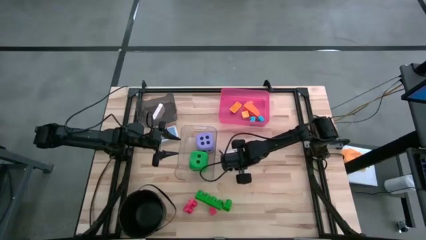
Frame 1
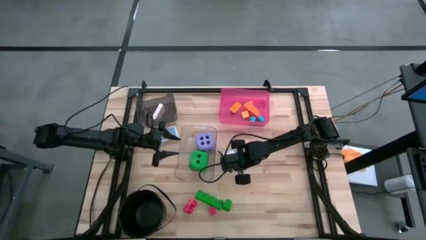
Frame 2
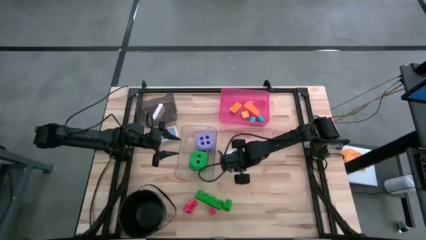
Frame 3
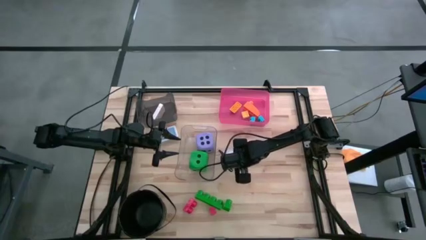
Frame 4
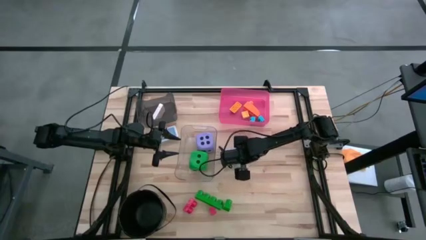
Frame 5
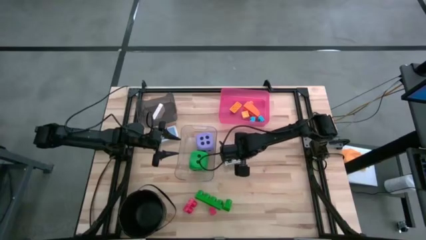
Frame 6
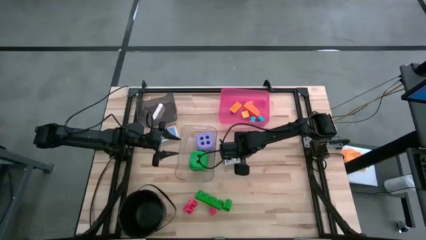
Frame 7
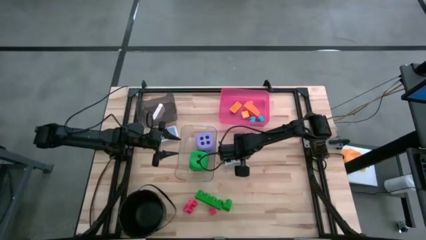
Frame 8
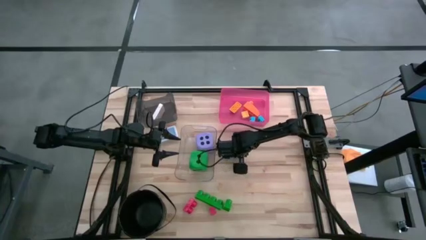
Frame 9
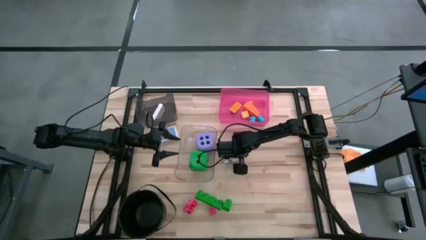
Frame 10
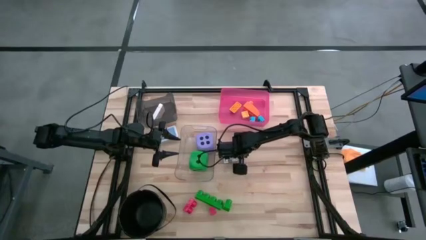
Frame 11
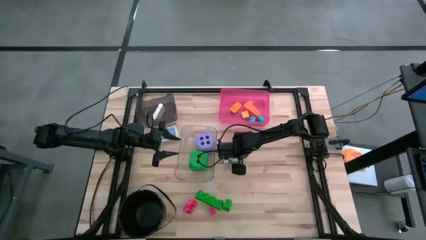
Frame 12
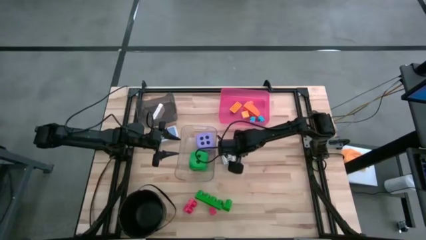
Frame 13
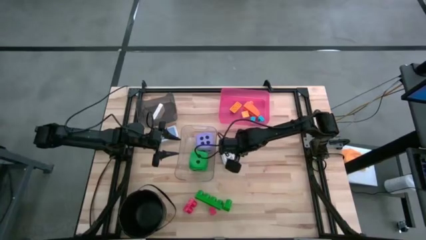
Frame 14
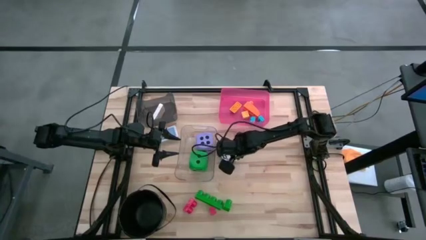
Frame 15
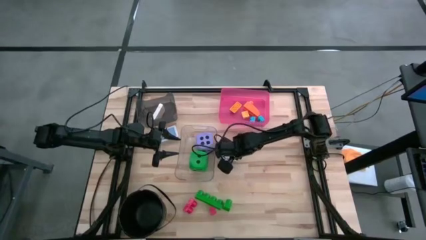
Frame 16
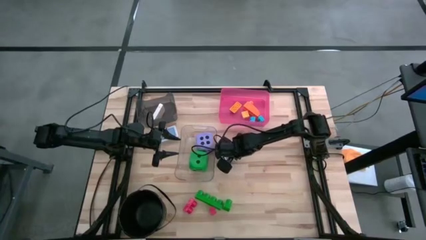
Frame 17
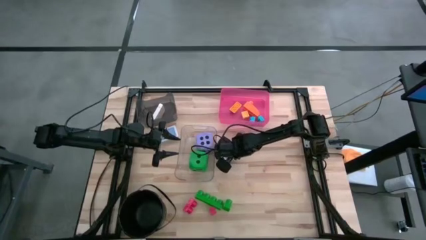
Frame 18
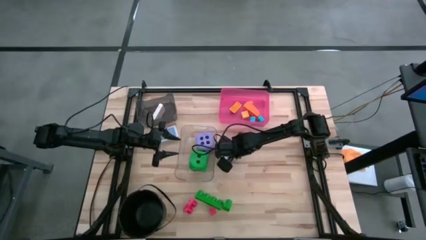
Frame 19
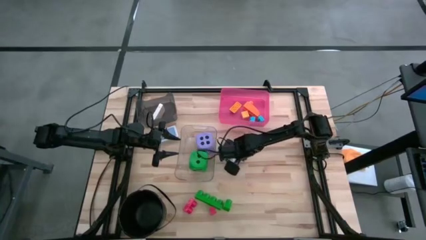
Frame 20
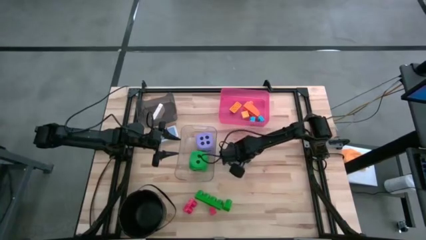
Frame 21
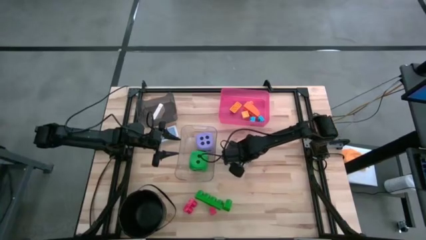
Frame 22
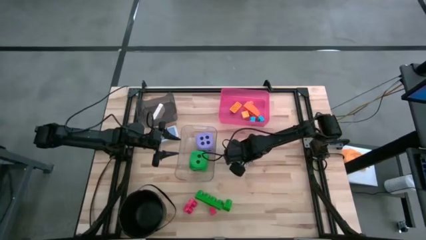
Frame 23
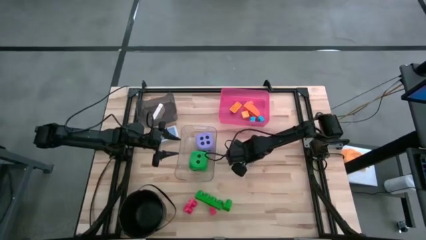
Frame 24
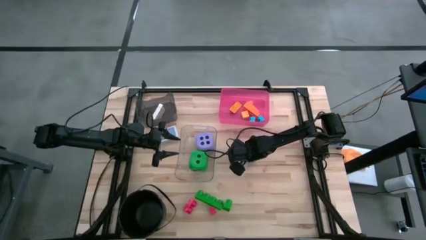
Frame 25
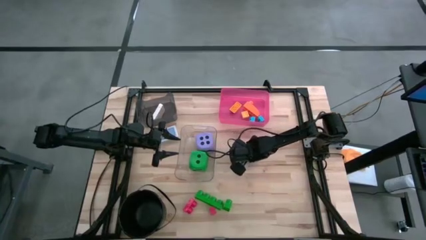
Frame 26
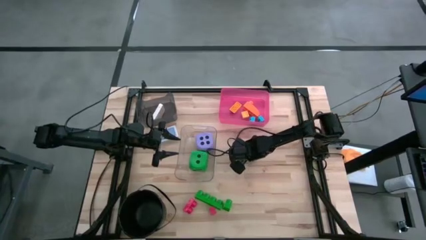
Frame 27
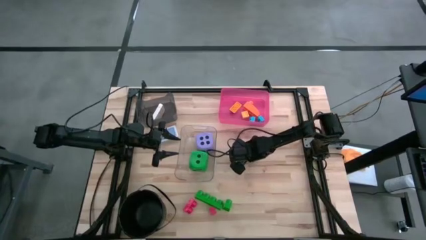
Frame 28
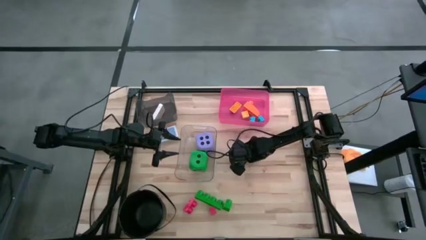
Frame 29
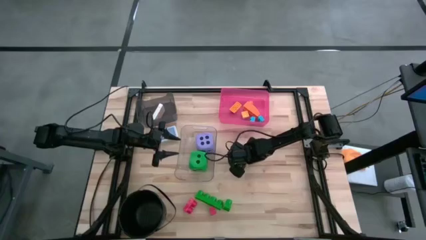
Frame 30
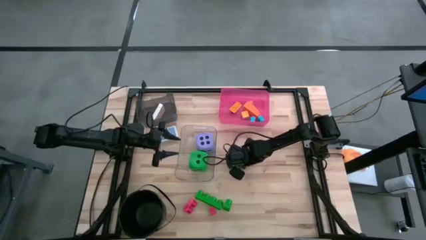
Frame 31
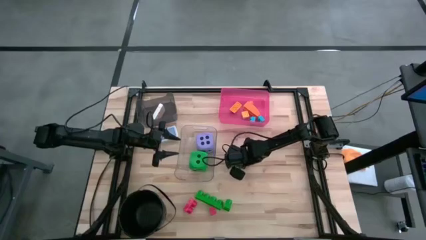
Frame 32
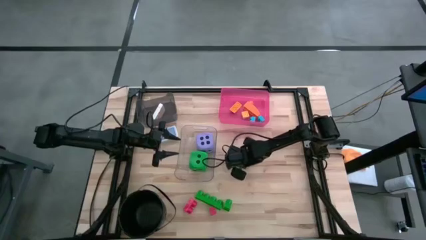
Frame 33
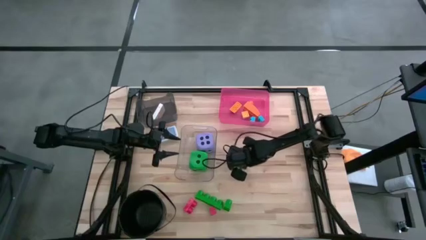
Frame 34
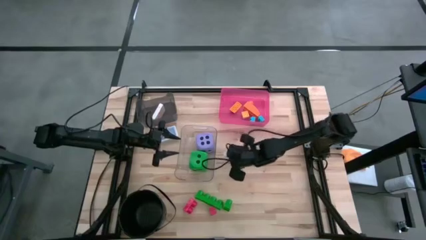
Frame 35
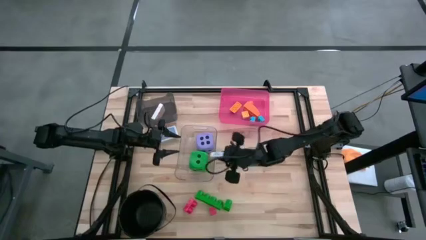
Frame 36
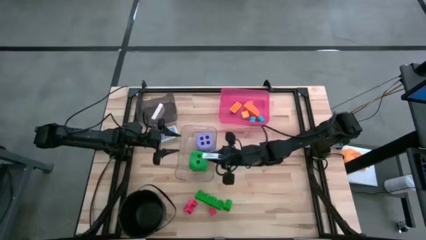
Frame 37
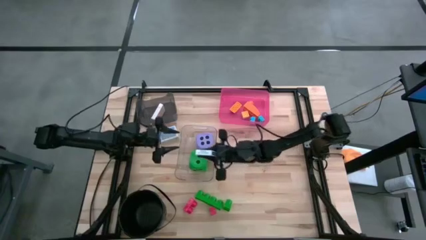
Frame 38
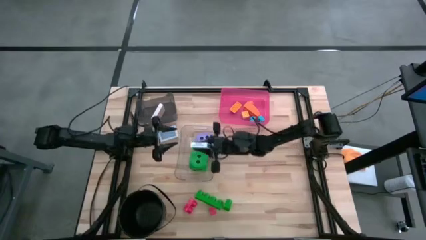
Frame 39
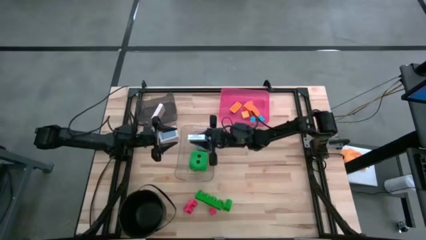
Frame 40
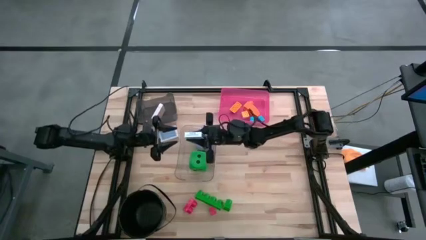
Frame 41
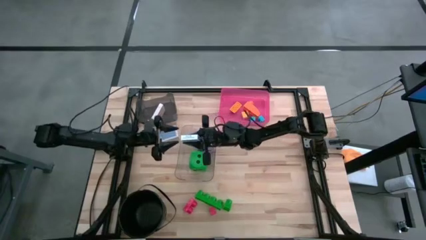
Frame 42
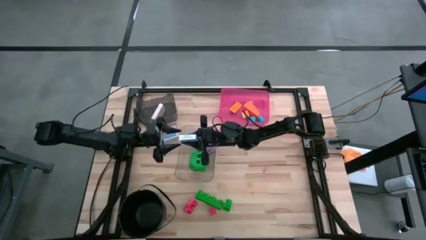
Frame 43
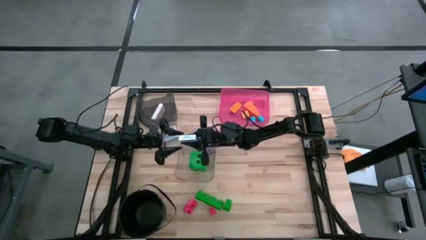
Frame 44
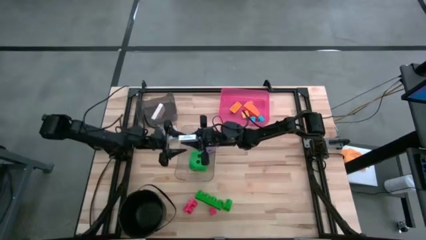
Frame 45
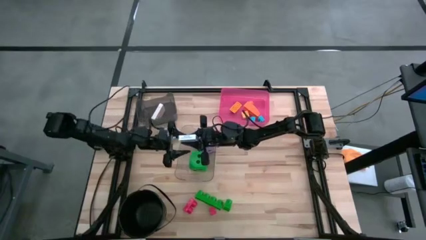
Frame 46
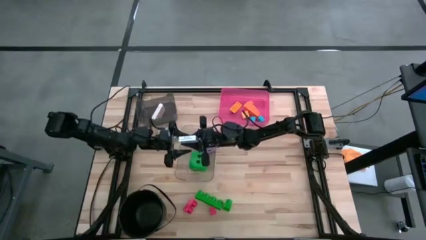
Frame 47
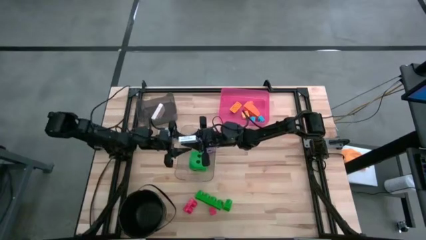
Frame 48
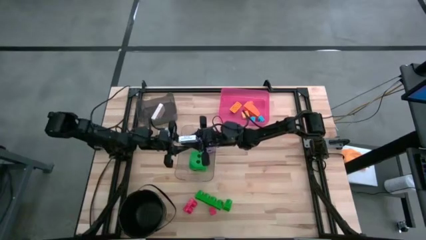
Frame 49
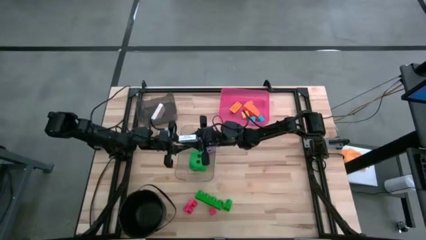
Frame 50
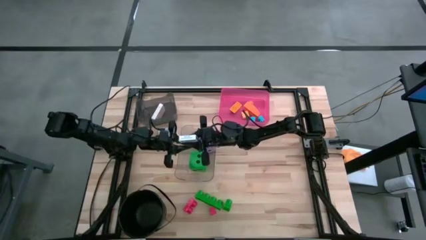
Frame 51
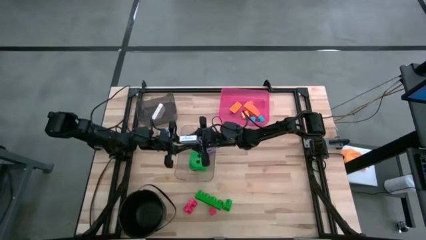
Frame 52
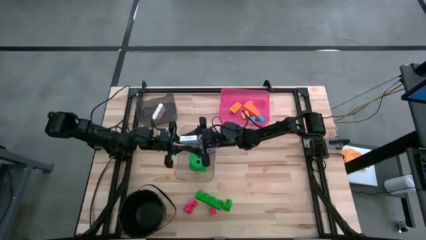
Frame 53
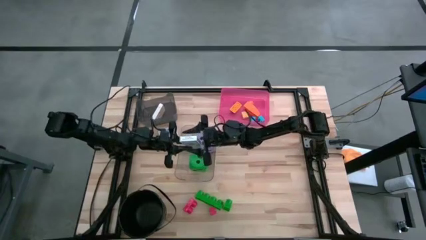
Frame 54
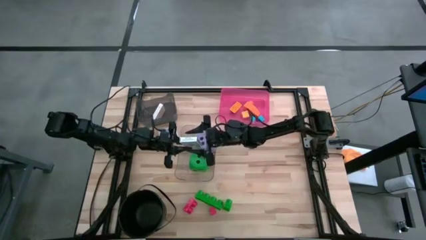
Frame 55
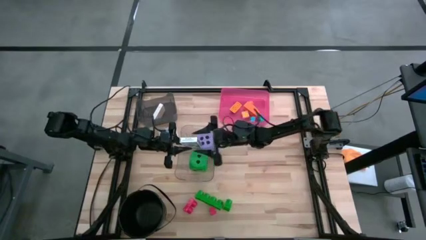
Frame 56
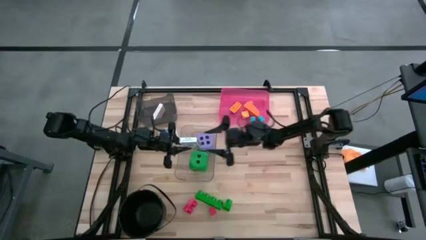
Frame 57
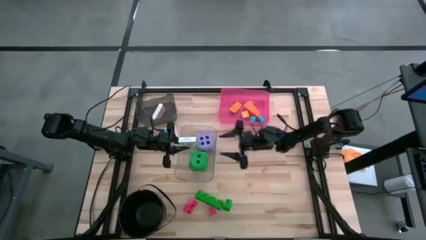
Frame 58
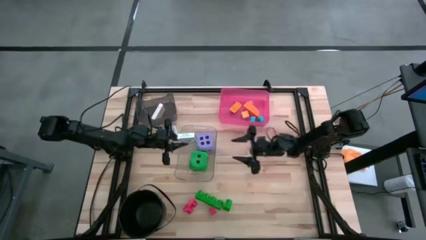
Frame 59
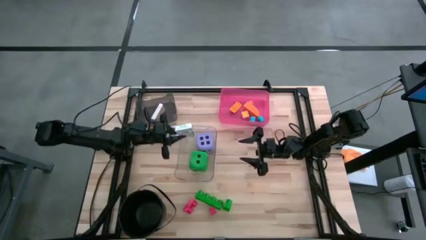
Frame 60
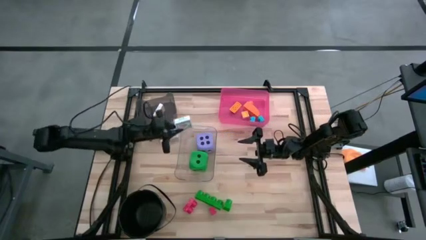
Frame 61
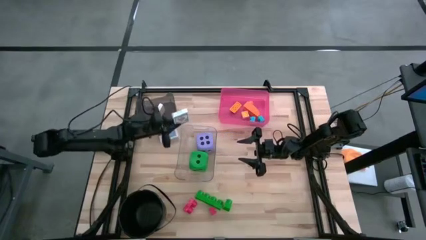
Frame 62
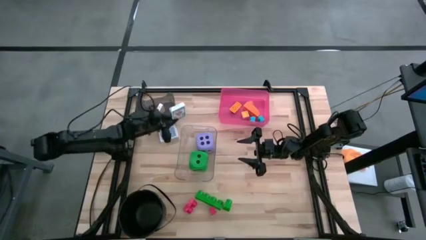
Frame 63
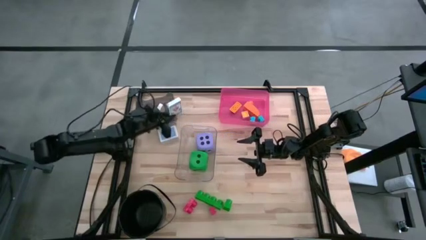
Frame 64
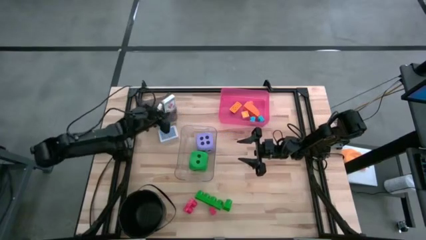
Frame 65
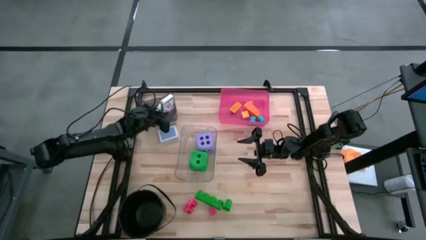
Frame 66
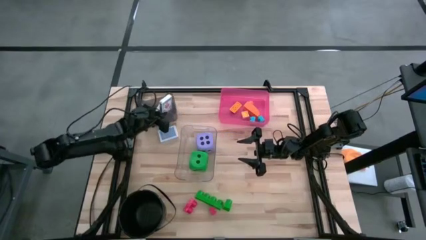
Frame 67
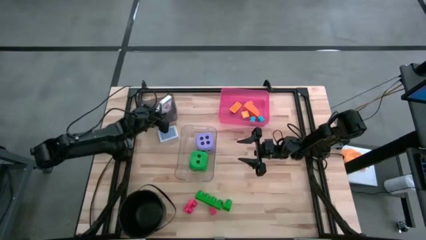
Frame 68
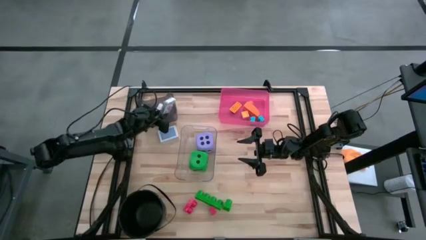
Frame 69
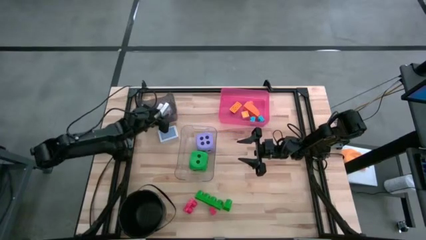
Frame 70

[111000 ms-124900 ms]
Task: Pick & Place Toys
Put the white deck of cards into the black bin

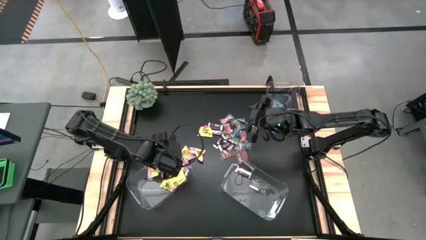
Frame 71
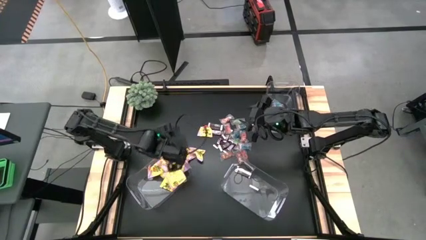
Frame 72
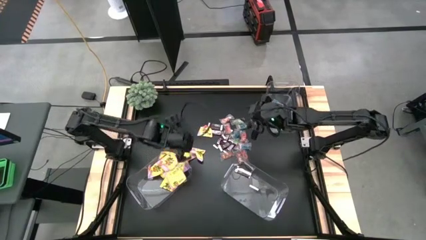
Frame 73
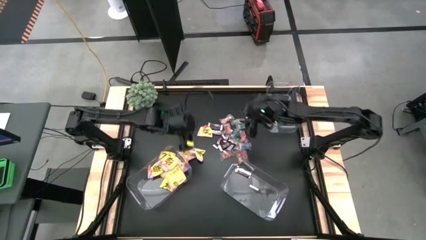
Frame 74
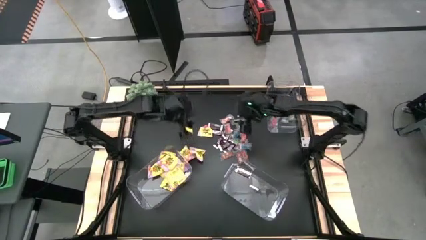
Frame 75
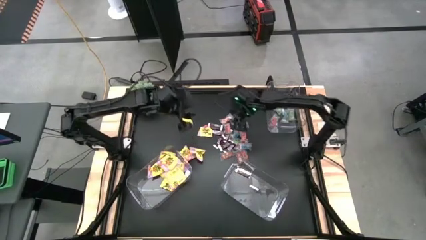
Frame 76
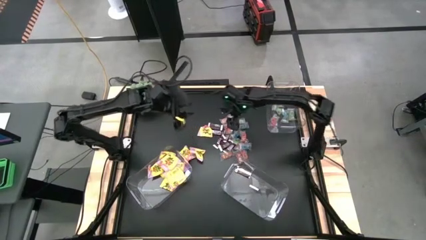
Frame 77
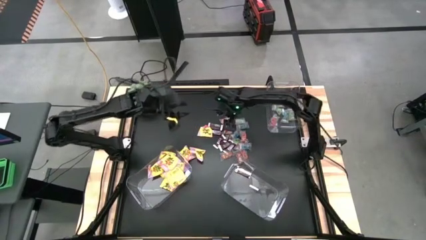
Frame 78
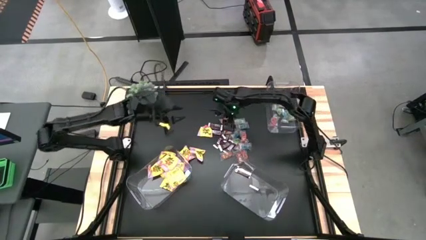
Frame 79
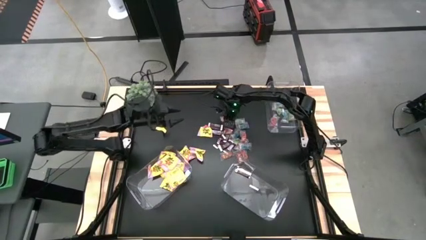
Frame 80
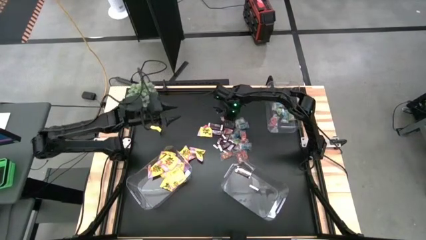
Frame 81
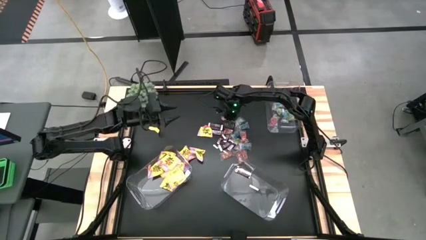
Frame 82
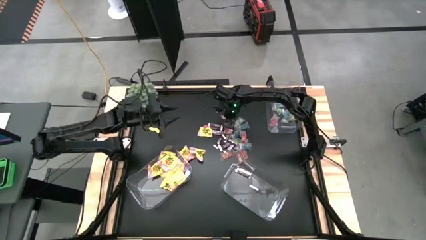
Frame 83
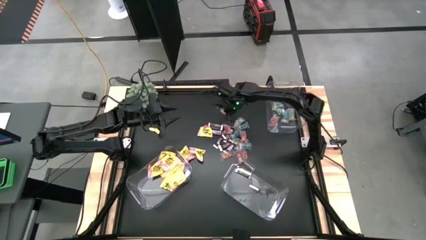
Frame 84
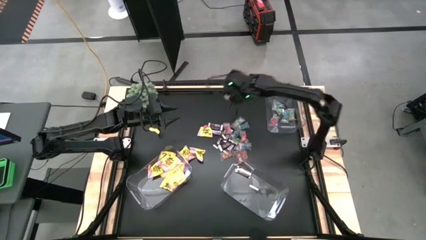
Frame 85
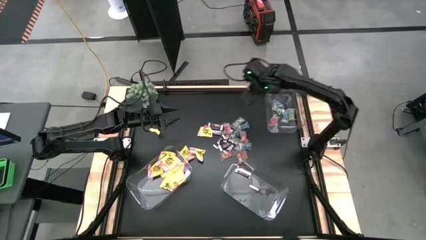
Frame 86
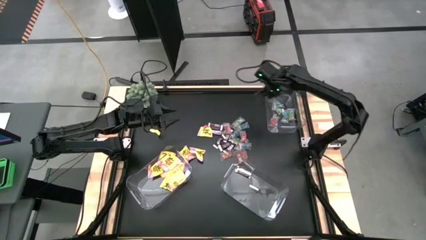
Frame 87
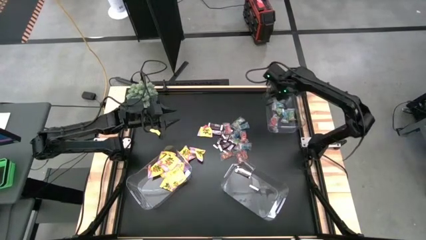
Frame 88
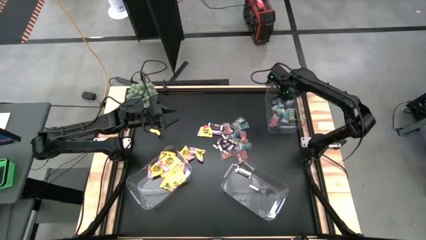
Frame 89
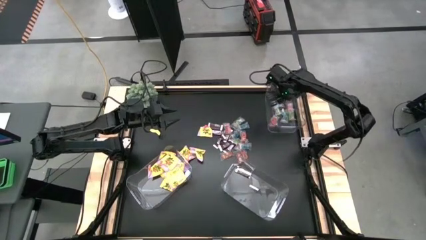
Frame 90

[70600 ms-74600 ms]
Task: Sort candy
Put the orange candy in the top right transparent container
